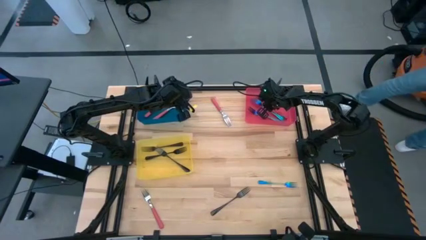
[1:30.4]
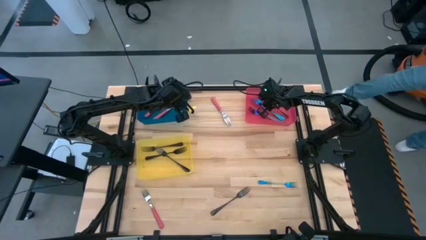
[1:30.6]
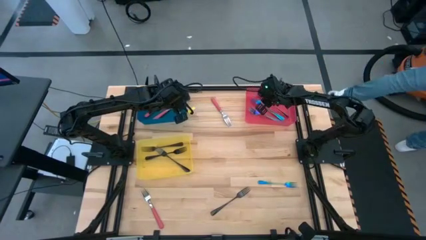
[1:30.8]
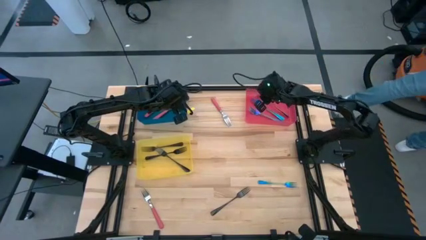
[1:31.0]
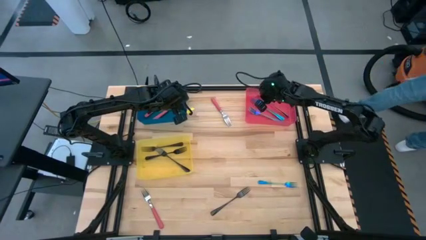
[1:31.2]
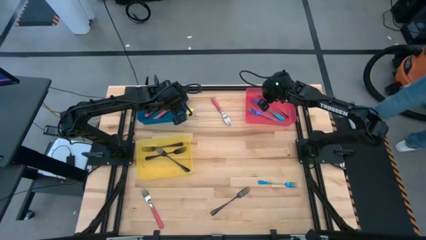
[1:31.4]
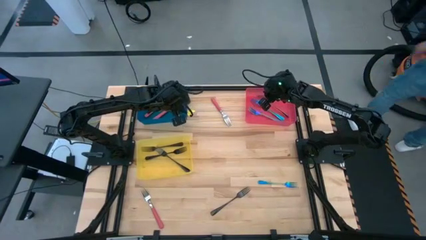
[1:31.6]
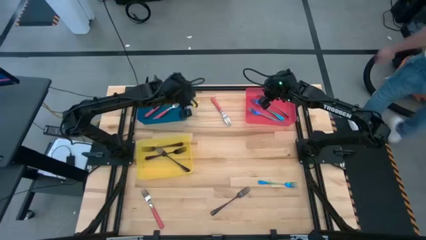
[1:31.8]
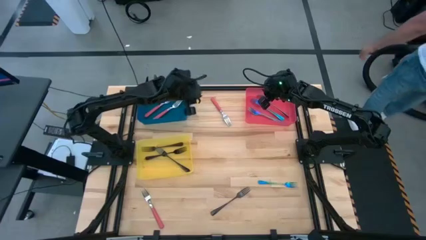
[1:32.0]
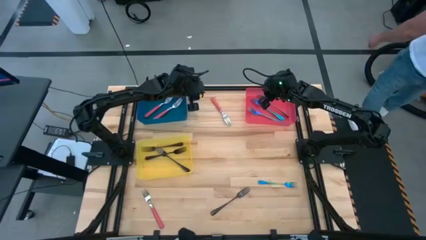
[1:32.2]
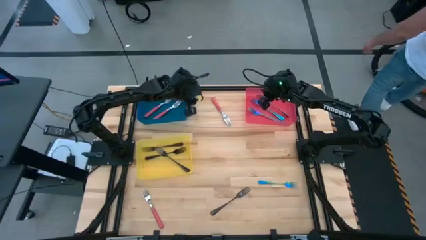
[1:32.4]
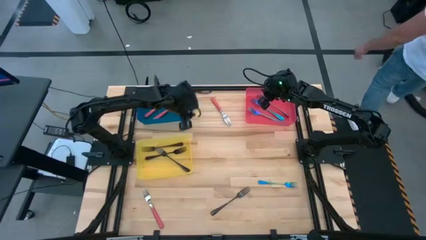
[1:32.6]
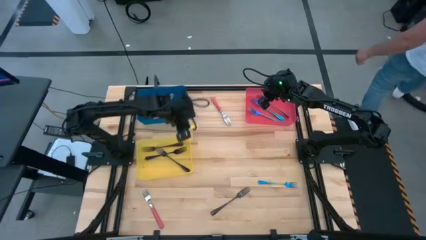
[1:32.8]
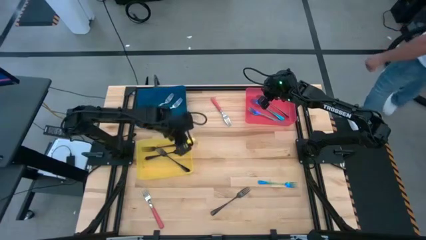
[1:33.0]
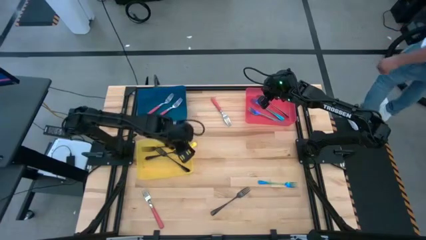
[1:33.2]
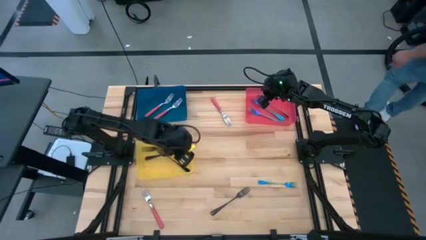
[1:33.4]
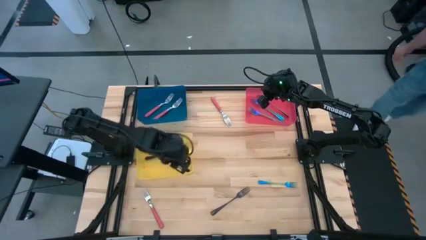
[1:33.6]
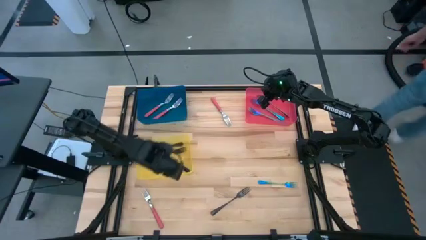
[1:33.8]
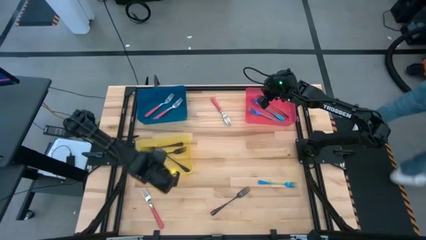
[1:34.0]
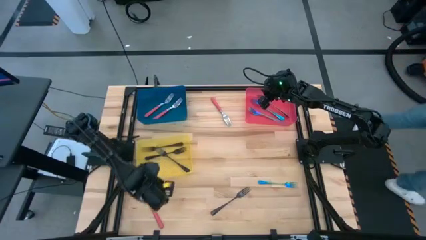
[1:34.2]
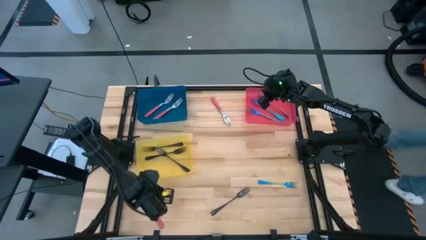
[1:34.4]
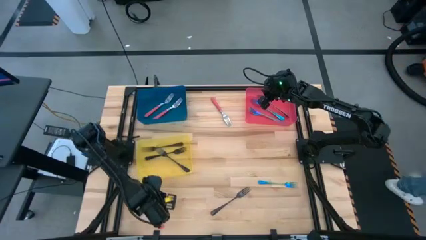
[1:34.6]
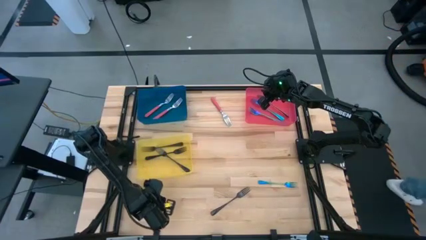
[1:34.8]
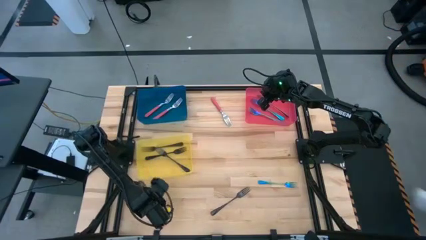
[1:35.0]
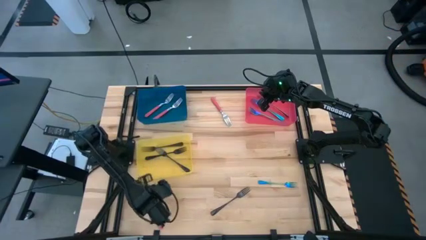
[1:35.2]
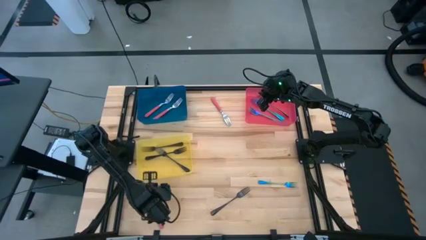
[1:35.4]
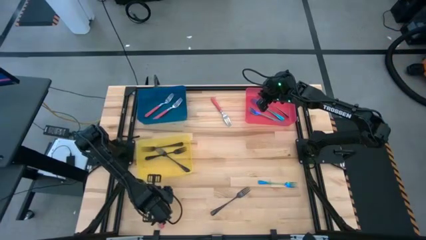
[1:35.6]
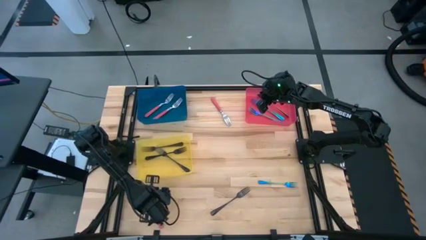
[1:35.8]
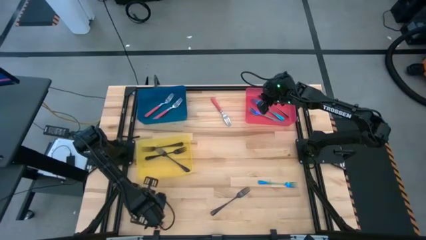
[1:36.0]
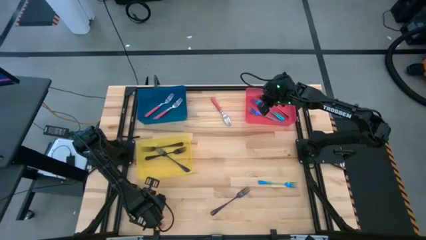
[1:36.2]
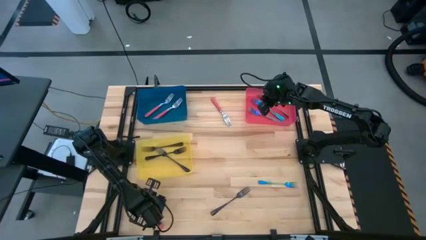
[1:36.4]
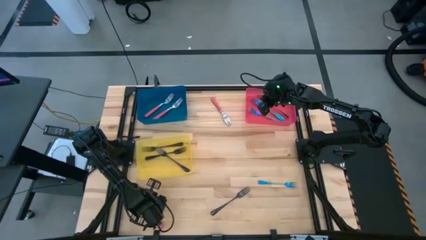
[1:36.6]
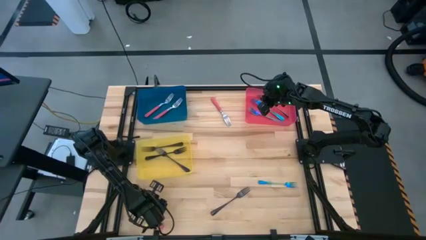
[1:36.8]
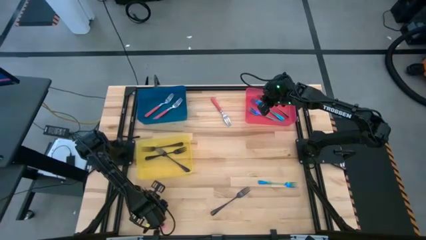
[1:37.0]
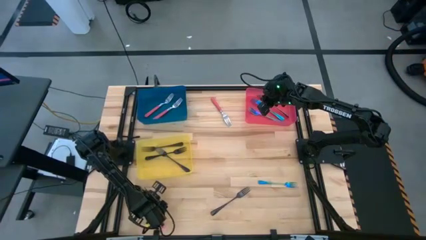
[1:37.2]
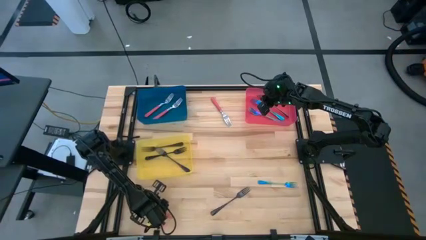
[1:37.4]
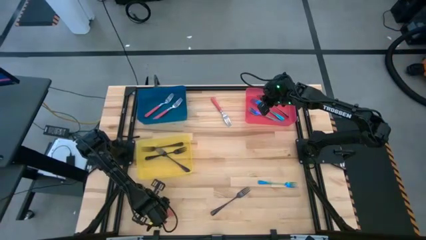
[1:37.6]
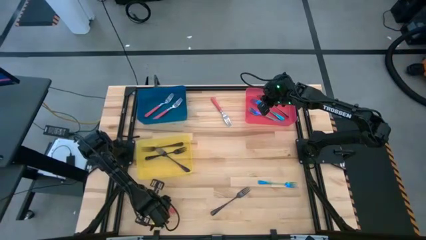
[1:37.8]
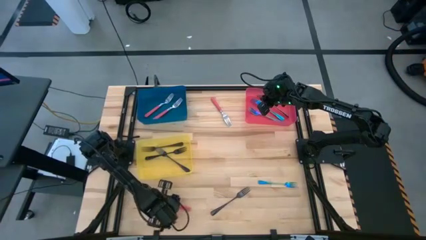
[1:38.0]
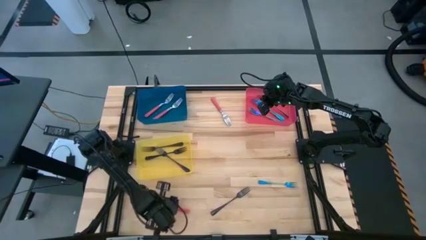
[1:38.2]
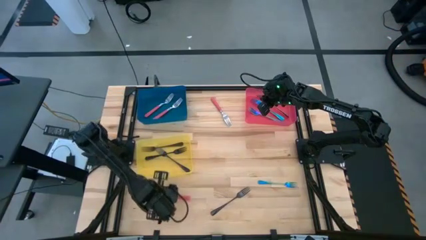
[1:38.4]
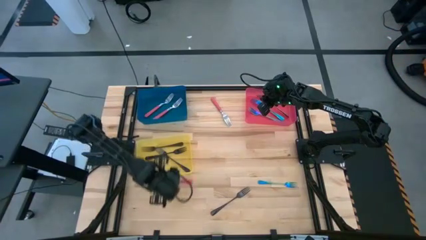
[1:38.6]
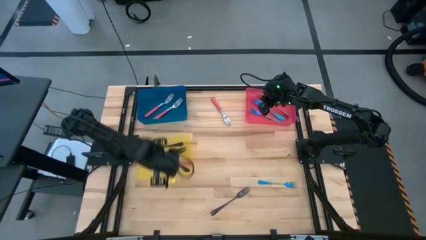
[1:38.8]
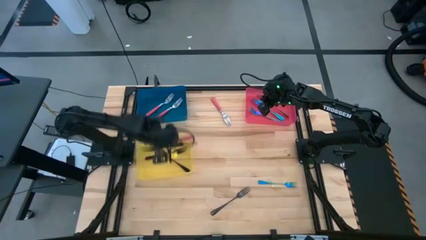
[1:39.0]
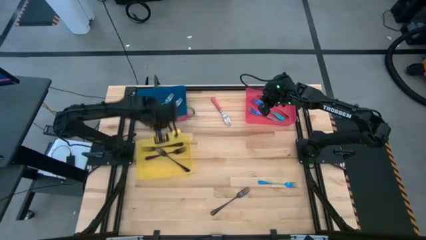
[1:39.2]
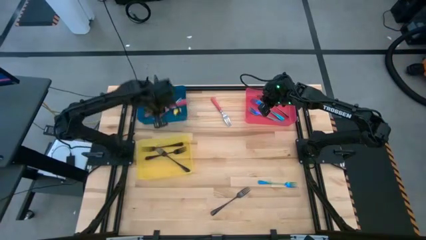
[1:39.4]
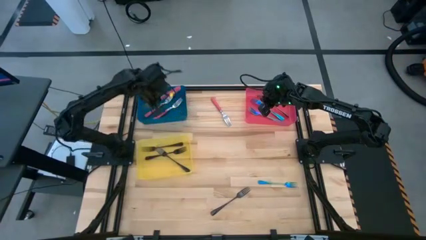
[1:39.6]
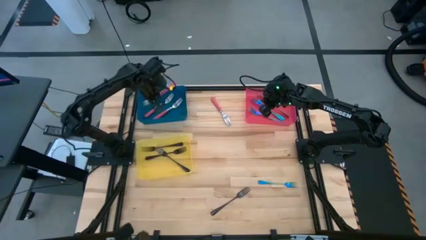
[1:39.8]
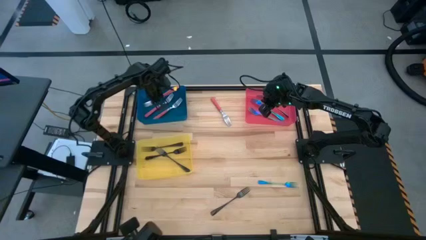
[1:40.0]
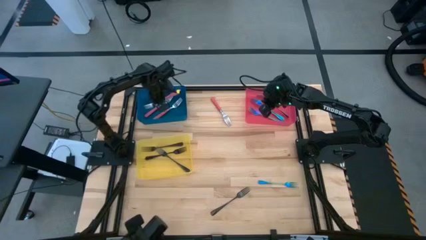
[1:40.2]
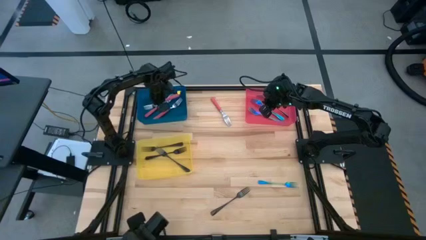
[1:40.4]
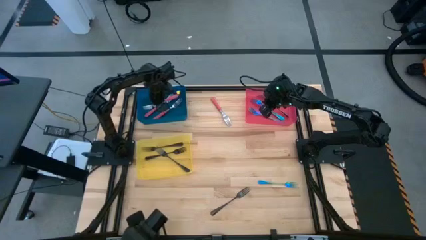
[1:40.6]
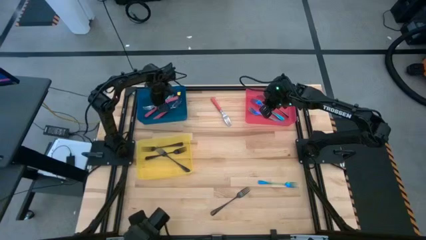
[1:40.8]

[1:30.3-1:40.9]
Task: Sort silverware by color (type)
Put the bottom pink fork into the blue bin

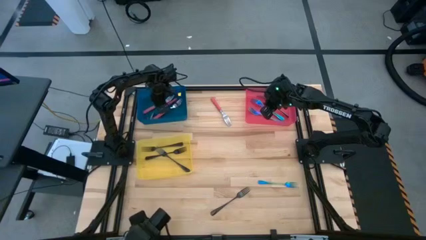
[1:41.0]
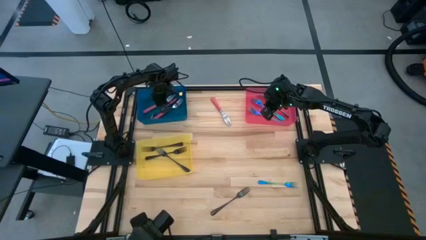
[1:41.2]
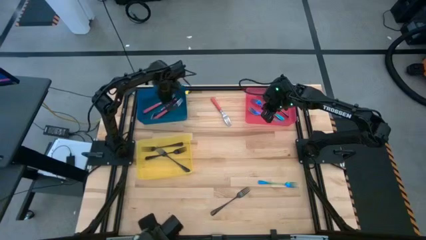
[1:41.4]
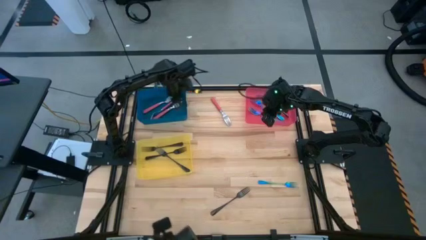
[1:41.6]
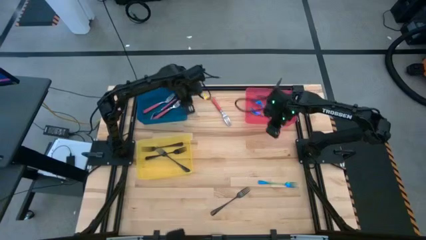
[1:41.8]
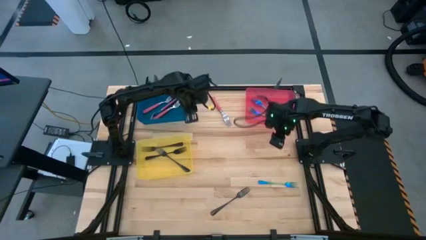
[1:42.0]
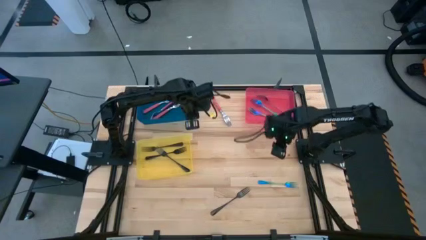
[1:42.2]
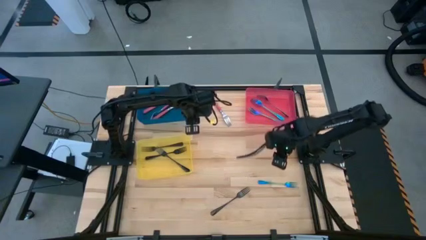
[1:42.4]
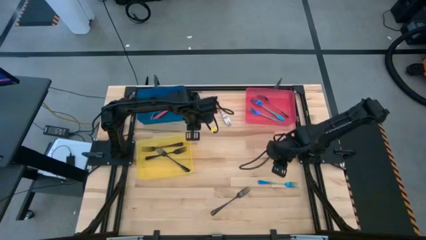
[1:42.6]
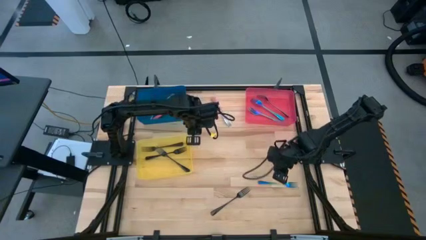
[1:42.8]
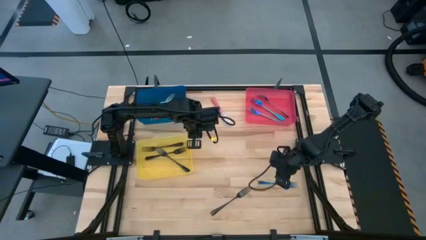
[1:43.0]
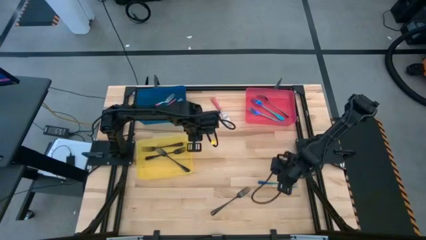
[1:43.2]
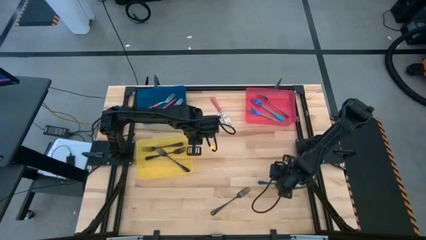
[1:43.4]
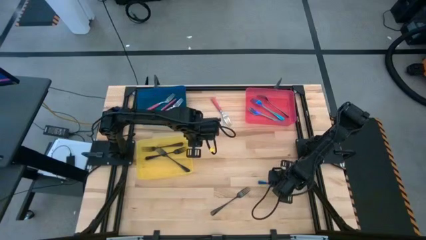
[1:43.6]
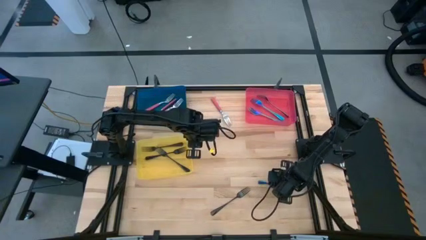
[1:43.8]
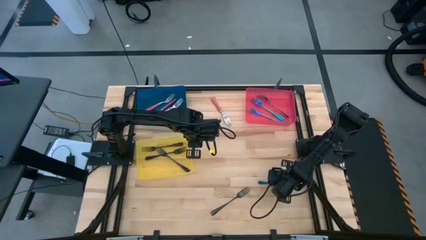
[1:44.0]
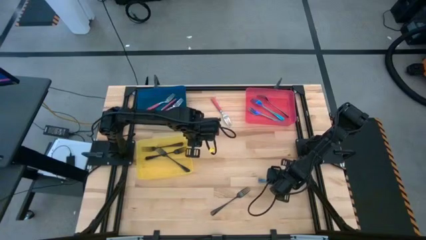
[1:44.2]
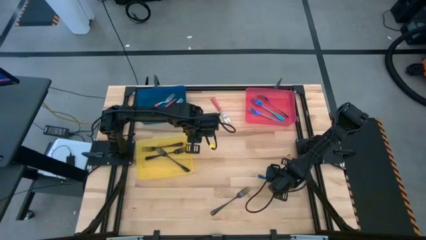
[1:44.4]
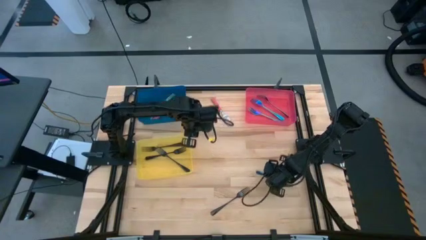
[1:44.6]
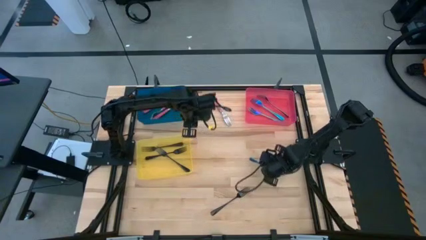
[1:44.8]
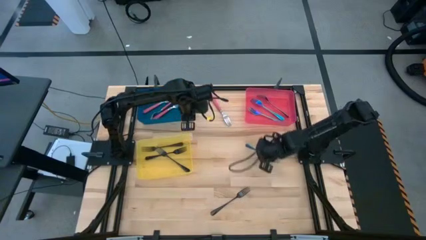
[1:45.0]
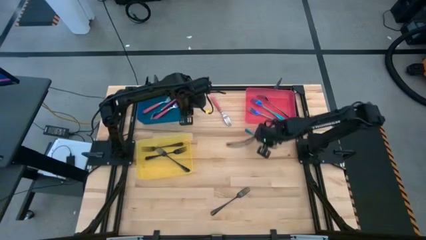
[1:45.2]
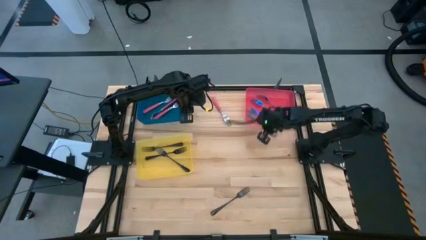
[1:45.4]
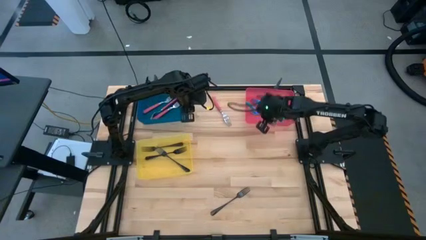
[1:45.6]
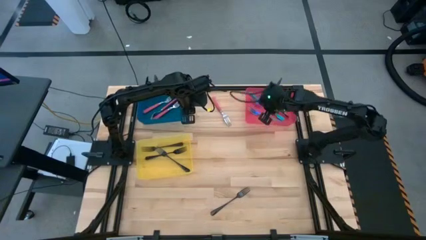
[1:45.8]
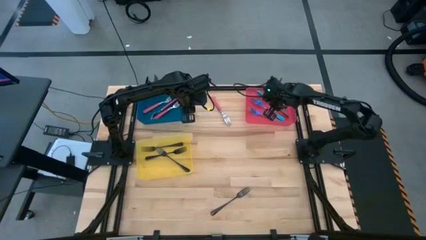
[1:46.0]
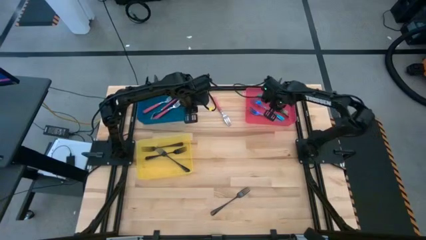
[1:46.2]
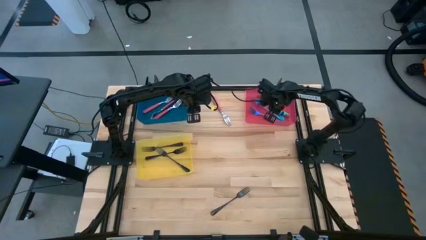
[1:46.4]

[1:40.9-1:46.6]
Put the blue fork into the red bin

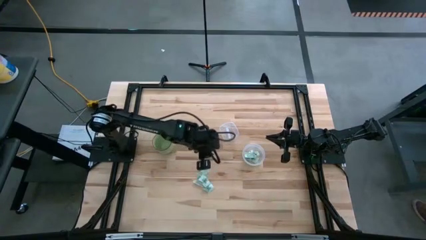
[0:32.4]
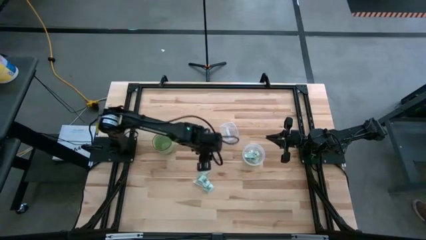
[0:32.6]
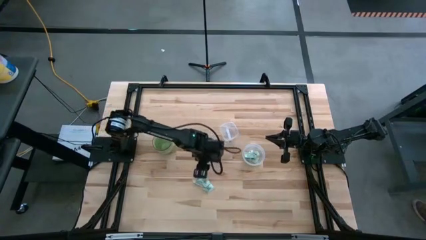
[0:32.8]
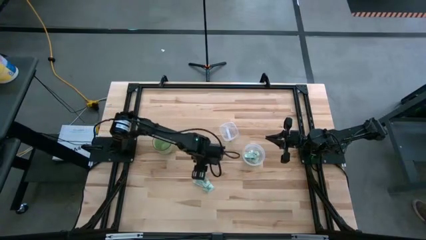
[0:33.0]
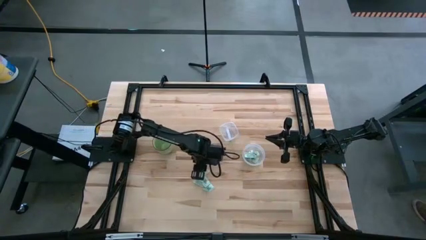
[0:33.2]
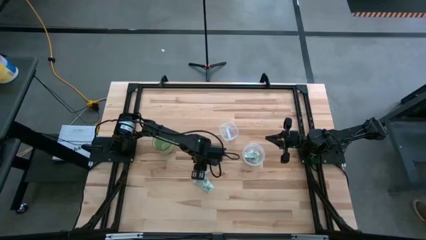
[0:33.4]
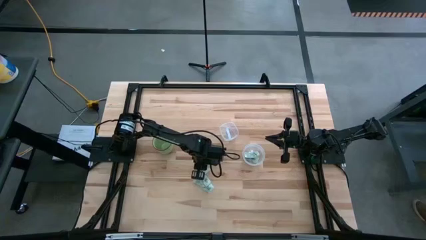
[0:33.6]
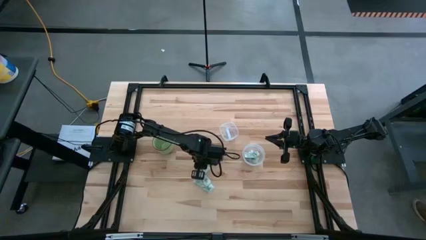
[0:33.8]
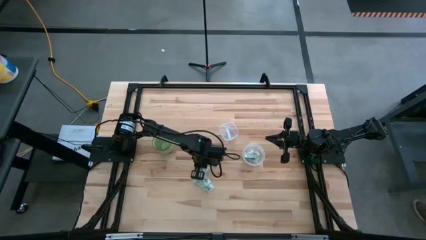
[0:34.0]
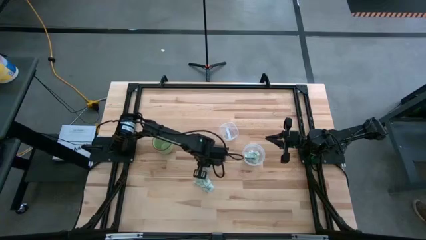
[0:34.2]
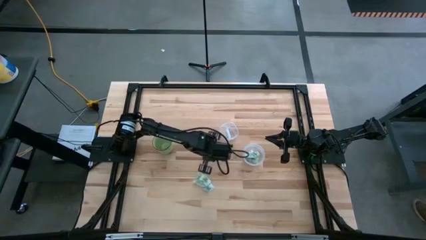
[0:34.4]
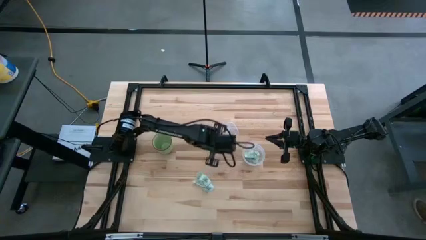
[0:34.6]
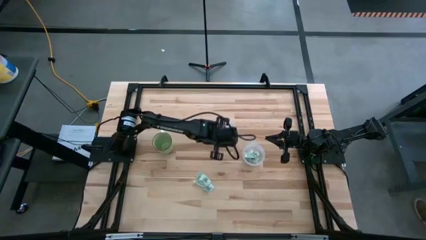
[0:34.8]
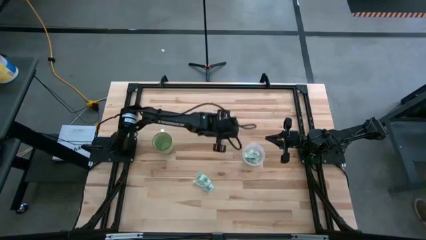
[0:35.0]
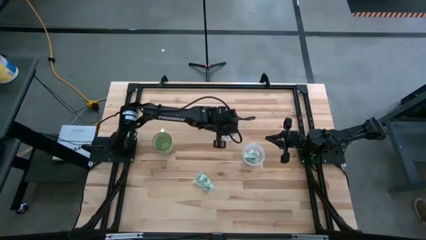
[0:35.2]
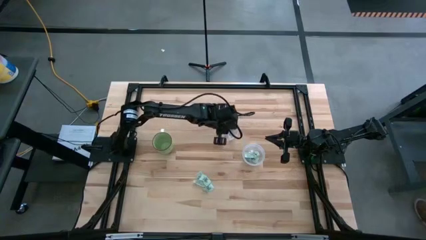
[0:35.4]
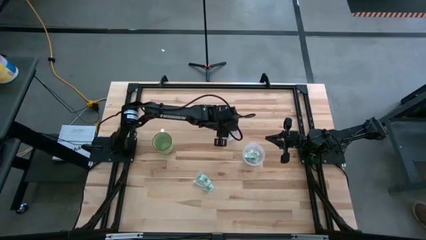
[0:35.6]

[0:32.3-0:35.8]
Task: Pick and place Stevia / Truvia into bins
Put the stevia packet into the top transparent container
